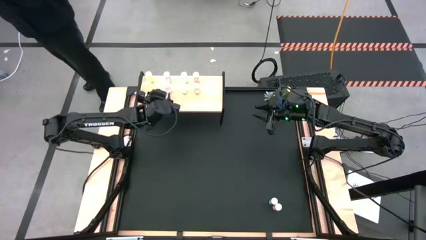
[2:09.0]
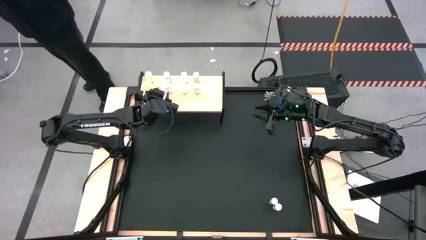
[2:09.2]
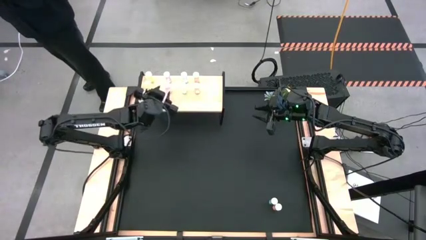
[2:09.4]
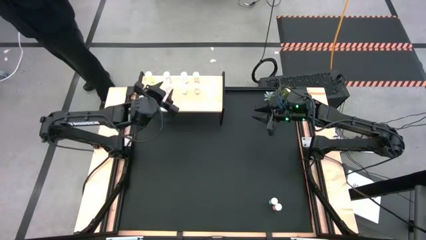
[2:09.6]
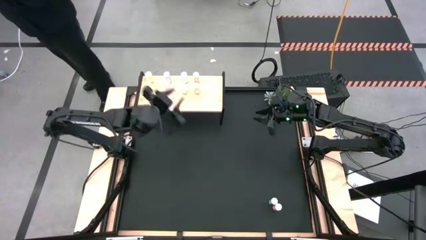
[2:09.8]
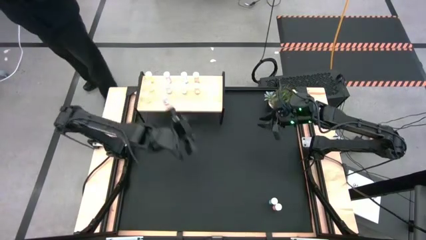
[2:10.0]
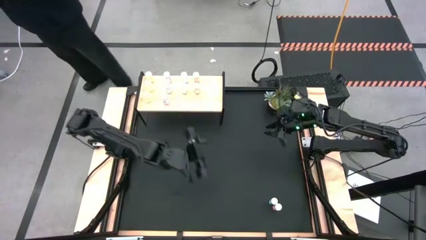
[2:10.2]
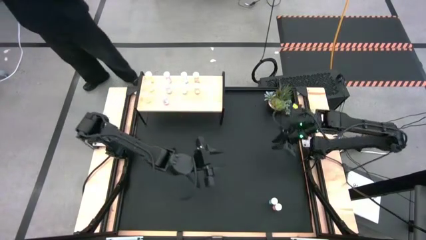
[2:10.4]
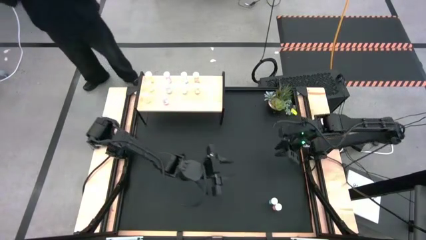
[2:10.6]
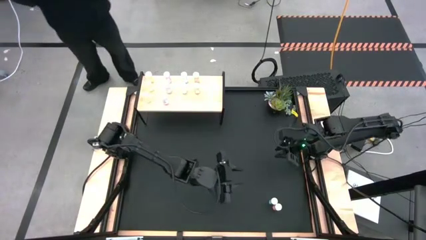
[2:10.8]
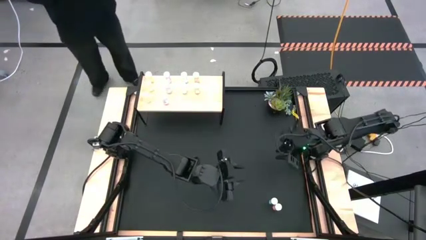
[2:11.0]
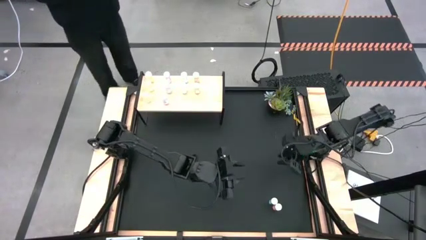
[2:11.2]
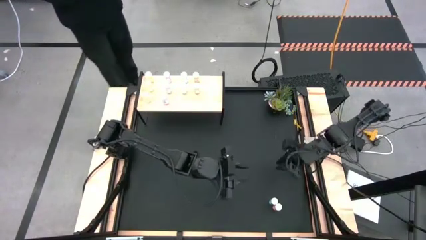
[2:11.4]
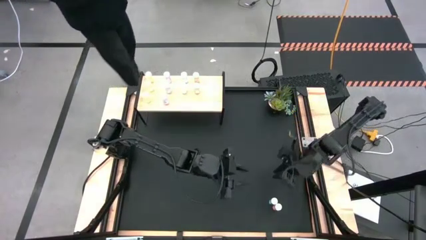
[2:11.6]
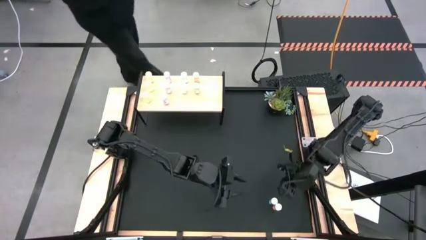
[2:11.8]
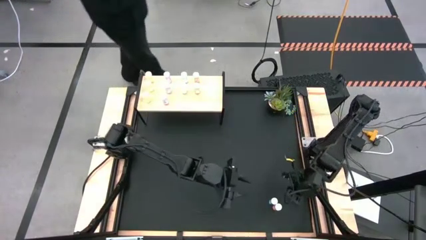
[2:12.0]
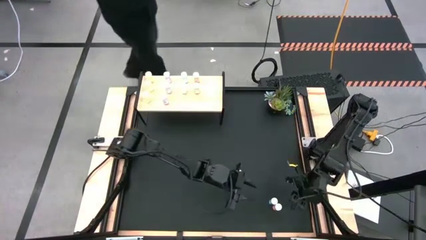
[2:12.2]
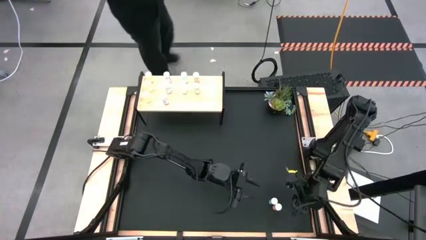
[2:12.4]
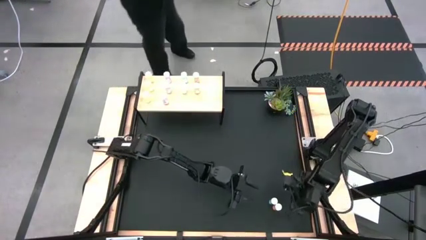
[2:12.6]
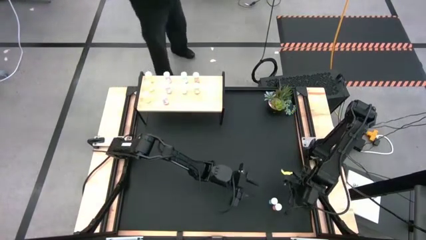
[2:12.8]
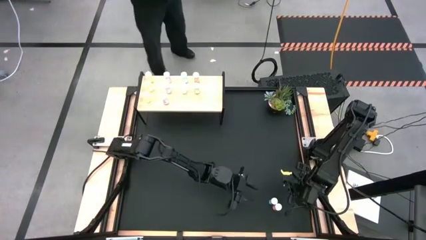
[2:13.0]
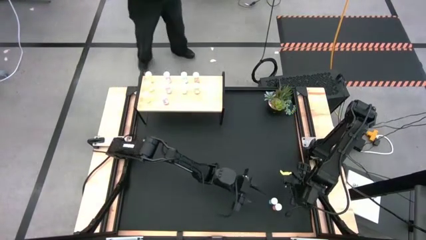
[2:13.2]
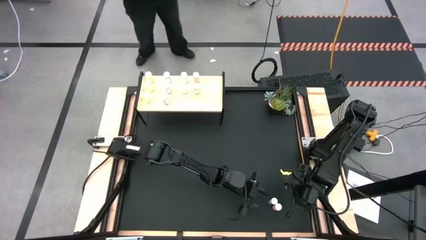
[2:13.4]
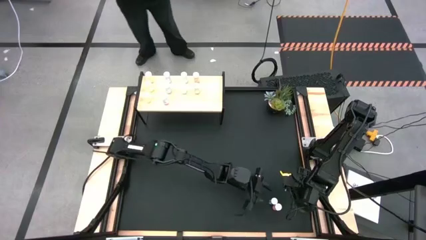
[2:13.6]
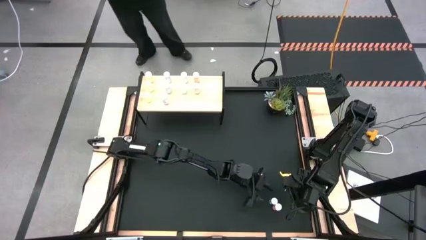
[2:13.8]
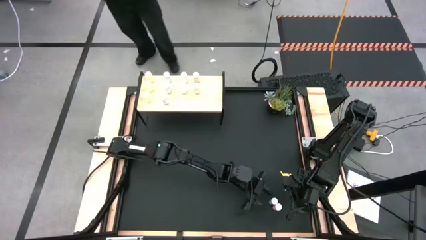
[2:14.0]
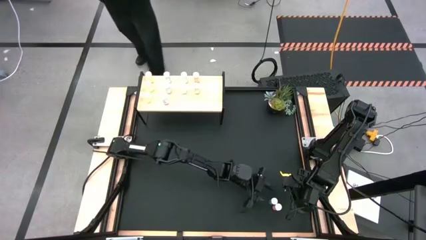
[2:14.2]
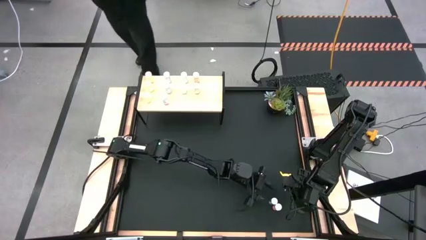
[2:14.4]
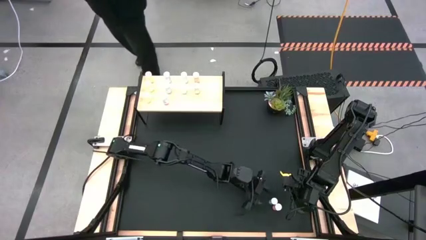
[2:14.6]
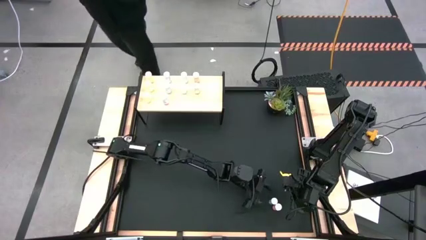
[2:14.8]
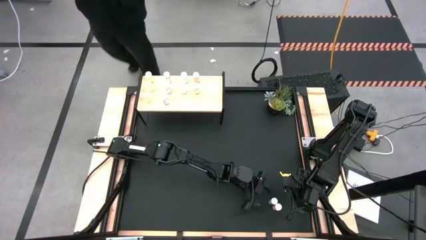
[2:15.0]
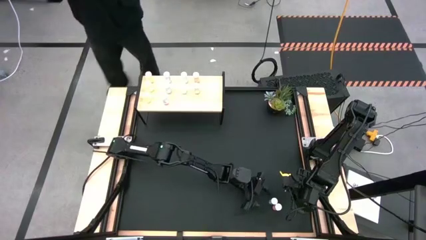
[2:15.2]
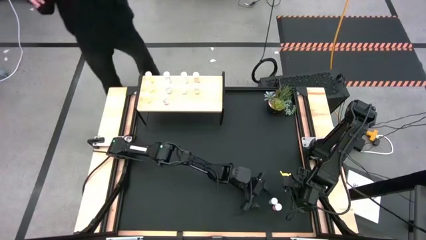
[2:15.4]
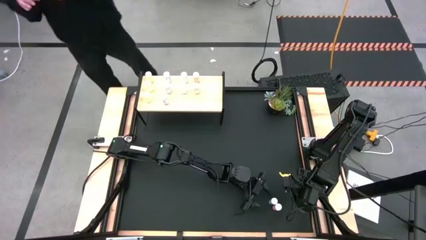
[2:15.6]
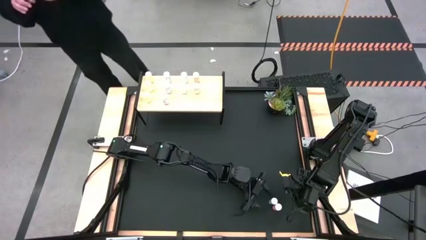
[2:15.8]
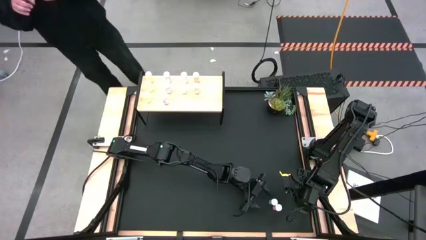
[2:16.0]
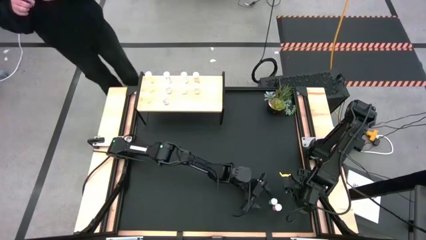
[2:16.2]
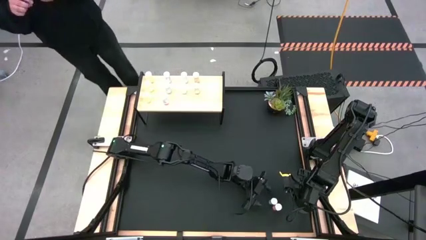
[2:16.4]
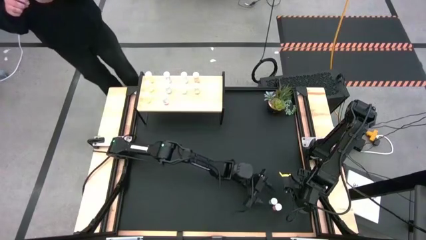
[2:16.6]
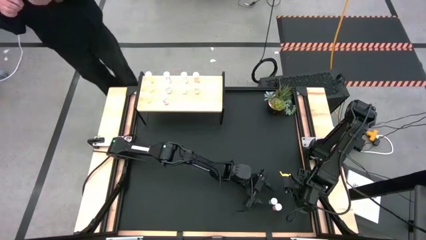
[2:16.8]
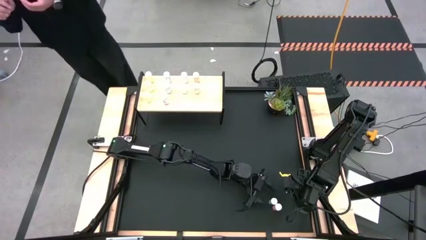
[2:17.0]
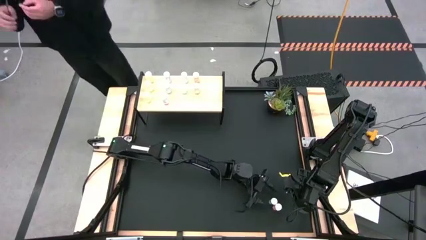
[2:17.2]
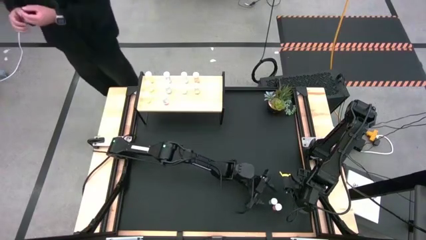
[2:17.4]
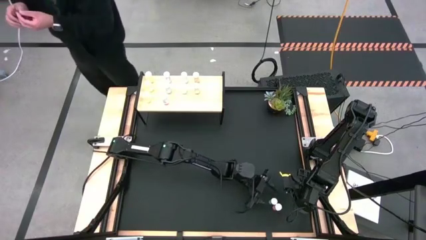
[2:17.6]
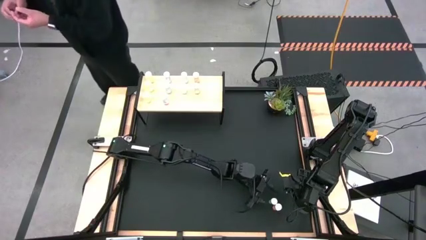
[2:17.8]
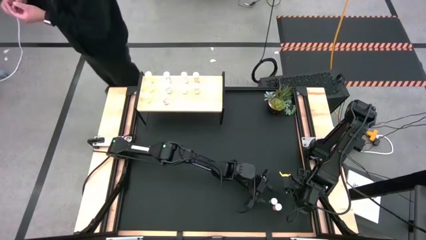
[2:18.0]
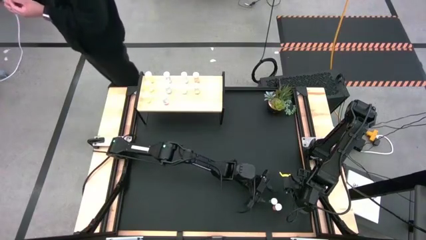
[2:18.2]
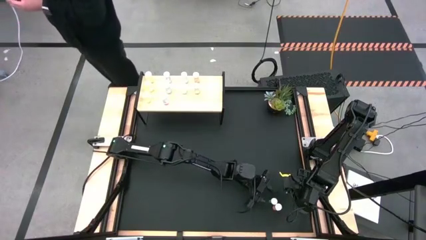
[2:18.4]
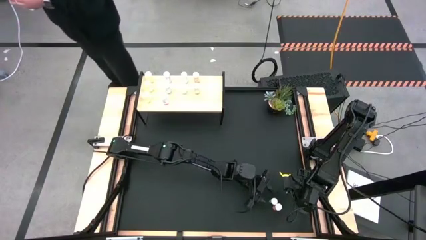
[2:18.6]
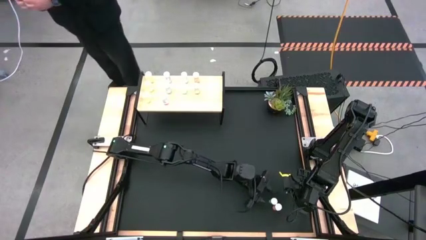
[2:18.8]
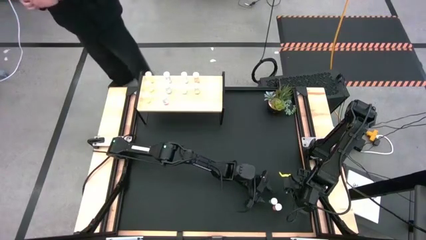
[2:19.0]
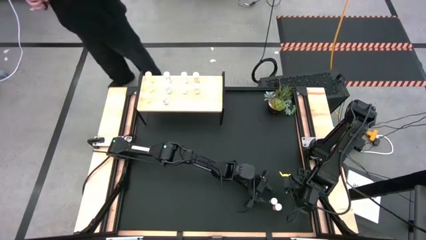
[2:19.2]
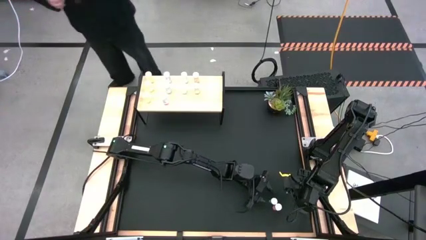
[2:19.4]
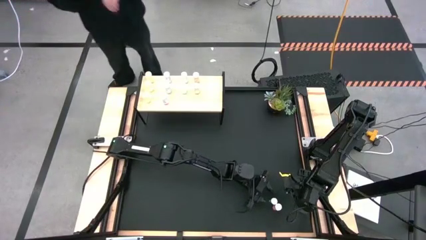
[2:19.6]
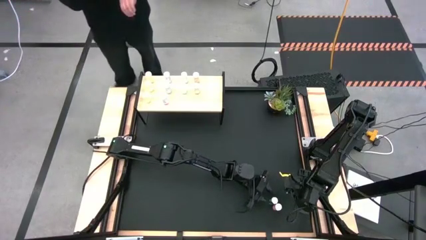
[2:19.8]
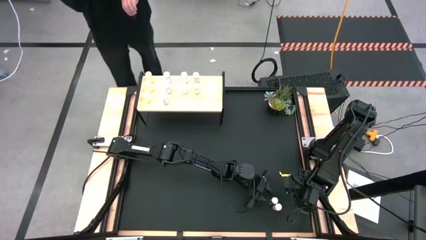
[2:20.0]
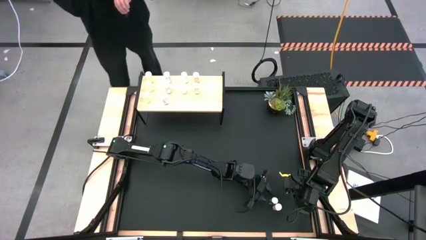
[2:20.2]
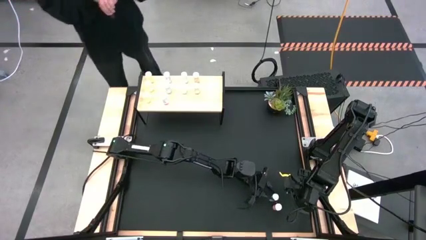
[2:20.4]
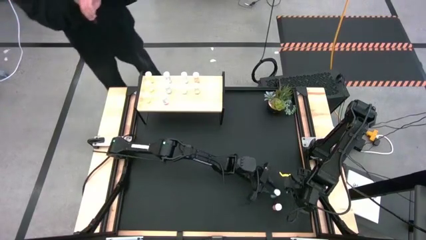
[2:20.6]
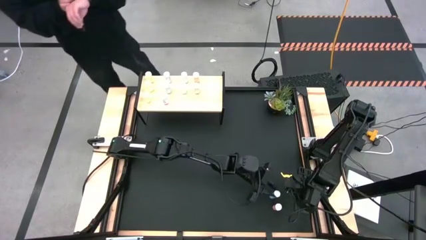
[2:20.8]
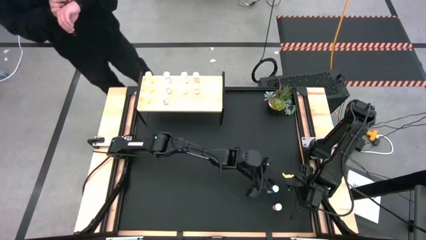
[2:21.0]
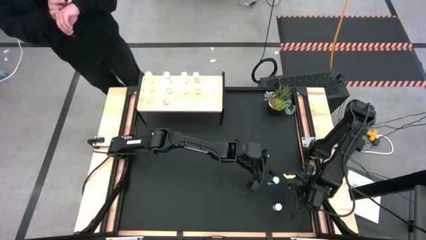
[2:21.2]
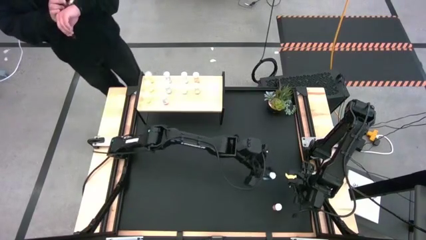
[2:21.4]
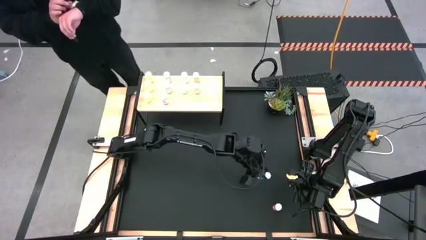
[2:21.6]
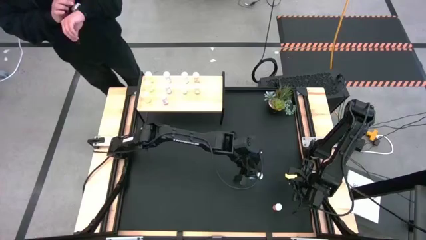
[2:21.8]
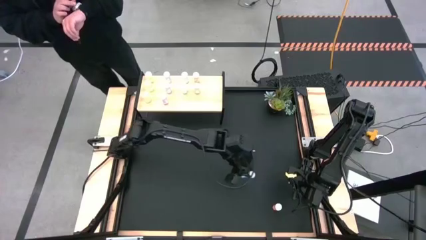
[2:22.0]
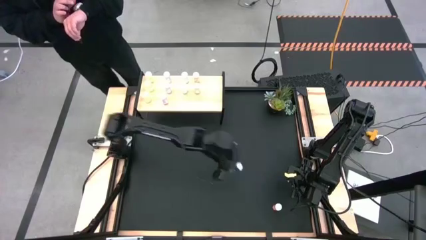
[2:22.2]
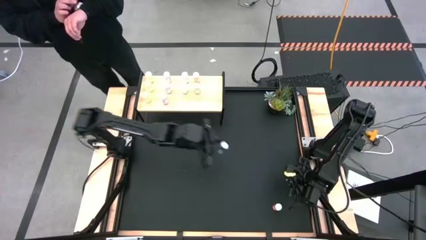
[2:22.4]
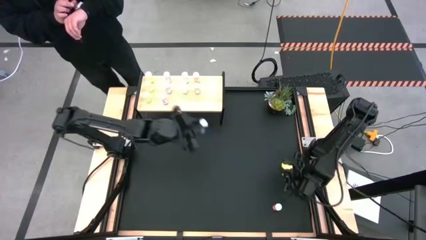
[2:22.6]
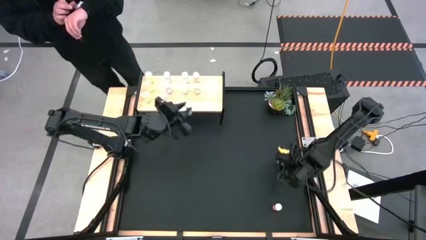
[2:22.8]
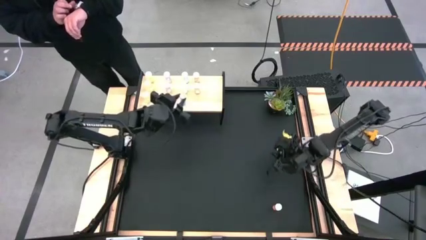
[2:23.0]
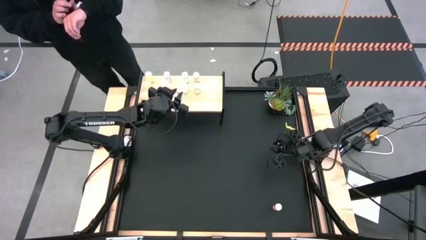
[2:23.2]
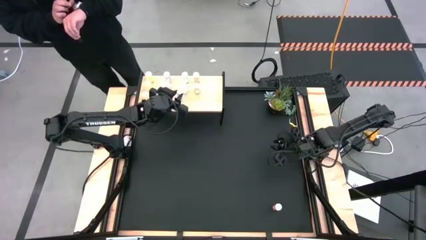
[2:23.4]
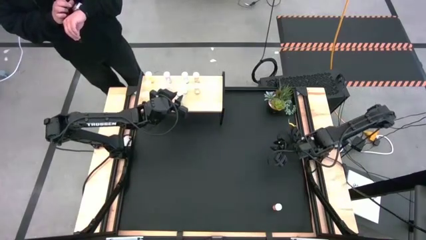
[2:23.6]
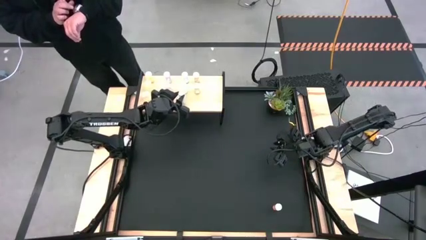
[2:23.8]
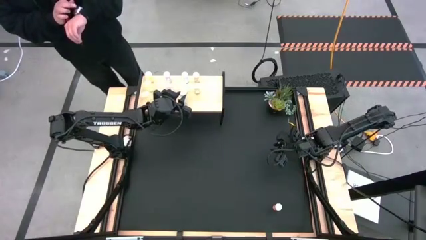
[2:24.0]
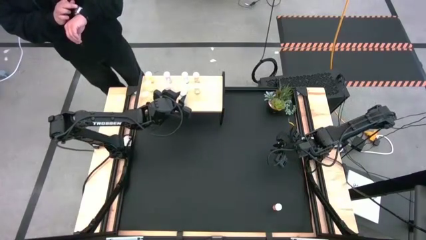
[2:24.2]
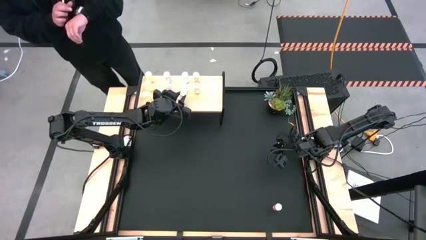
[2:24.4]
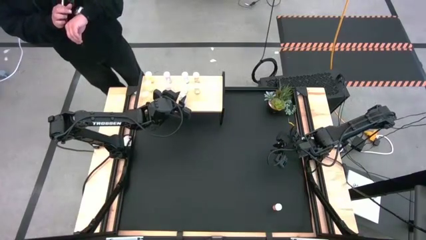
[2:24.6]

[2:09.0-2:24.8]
Task: Pick and place medicine bottles onto shelf by color
Put the blue medicine bottle aligned with the other blue medicine bottle on the shelf
